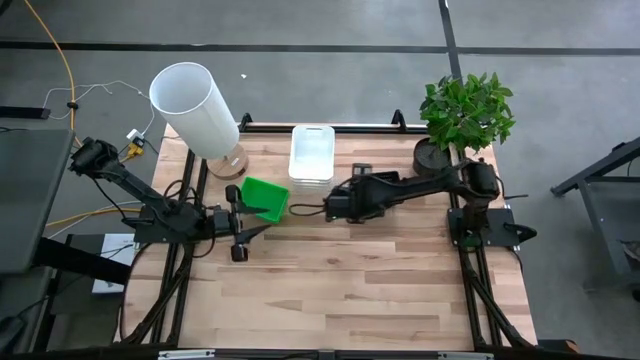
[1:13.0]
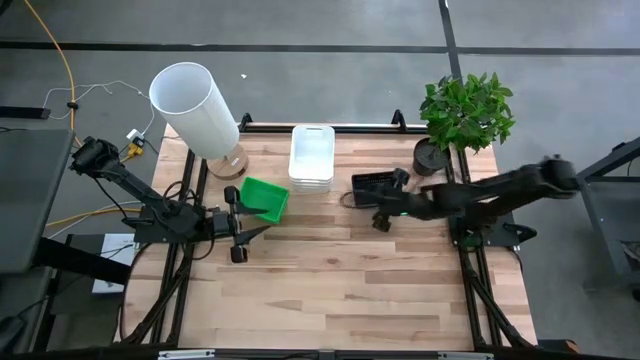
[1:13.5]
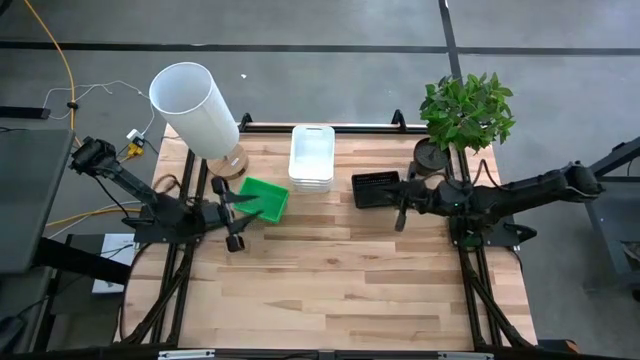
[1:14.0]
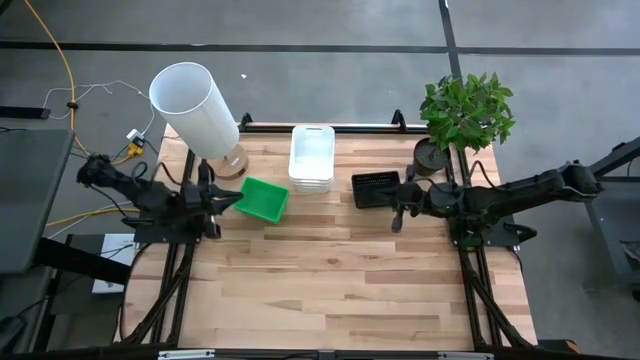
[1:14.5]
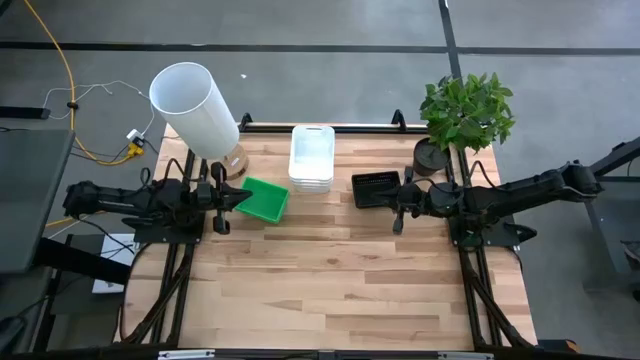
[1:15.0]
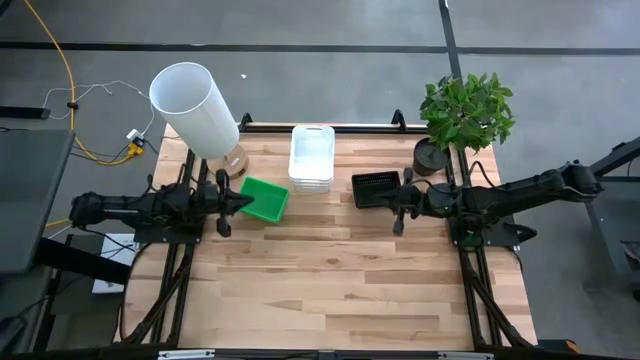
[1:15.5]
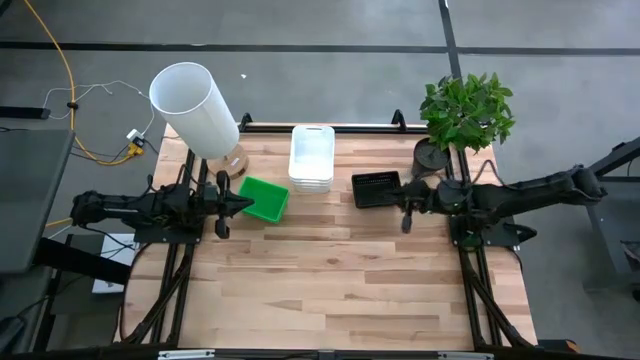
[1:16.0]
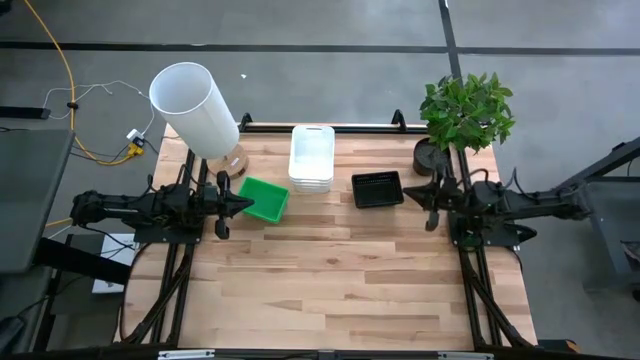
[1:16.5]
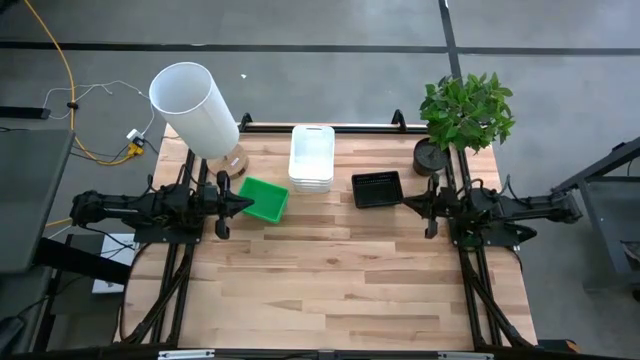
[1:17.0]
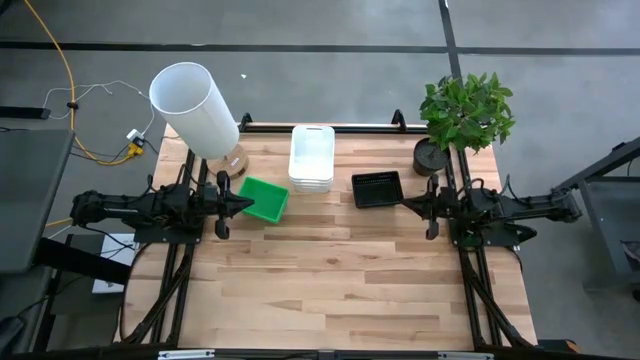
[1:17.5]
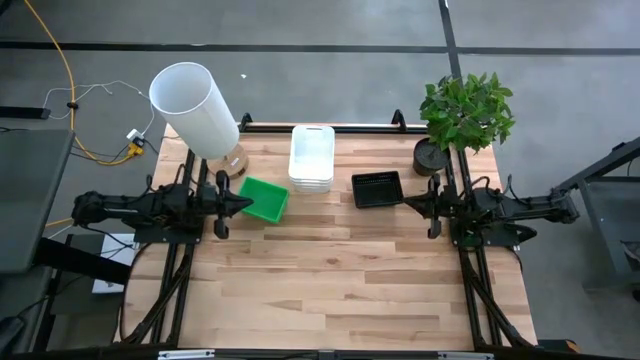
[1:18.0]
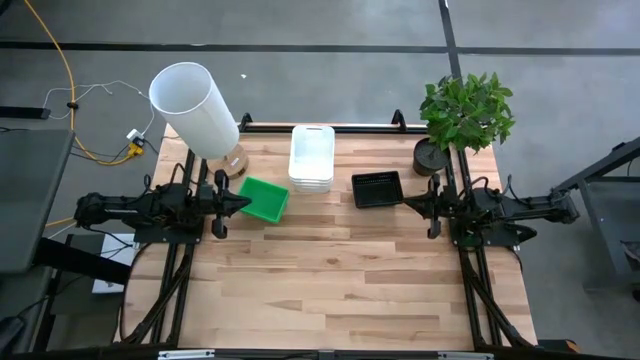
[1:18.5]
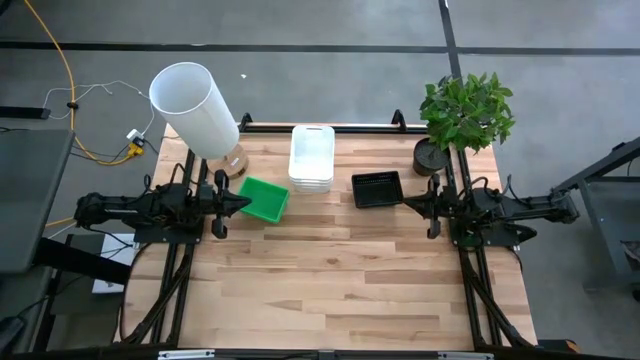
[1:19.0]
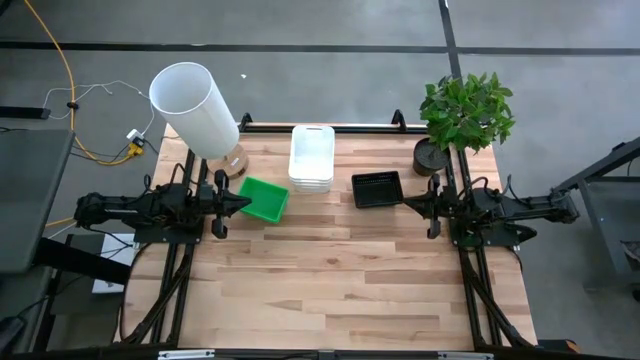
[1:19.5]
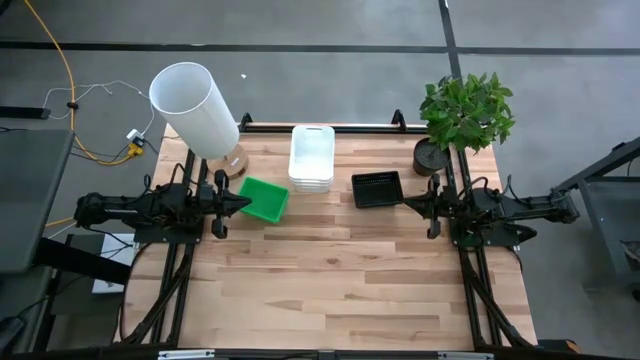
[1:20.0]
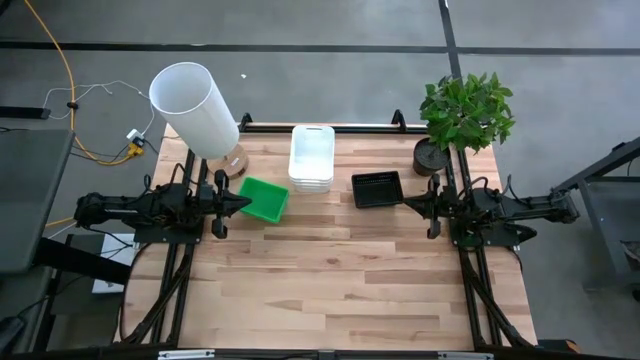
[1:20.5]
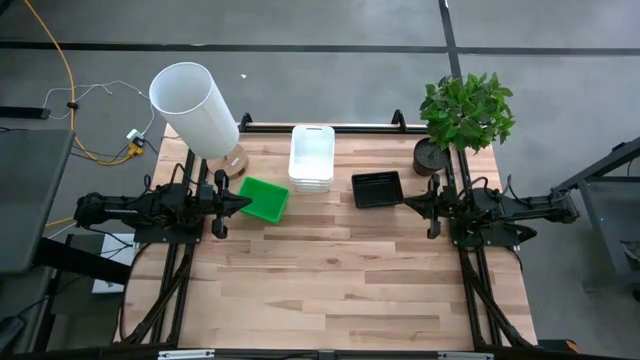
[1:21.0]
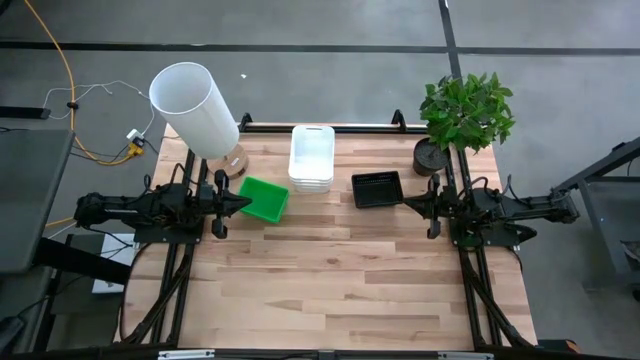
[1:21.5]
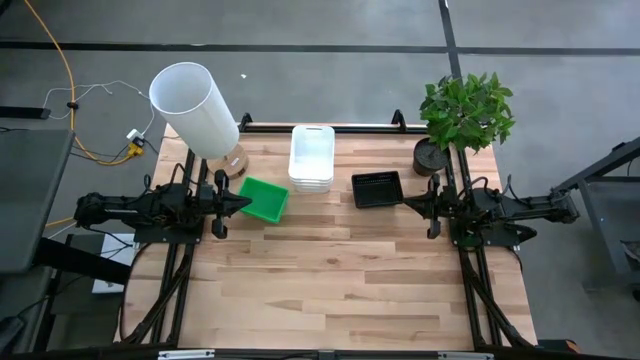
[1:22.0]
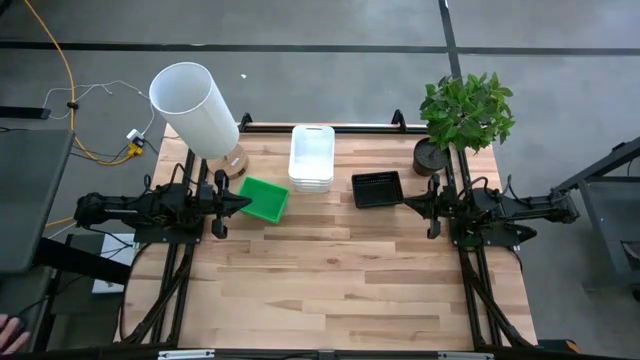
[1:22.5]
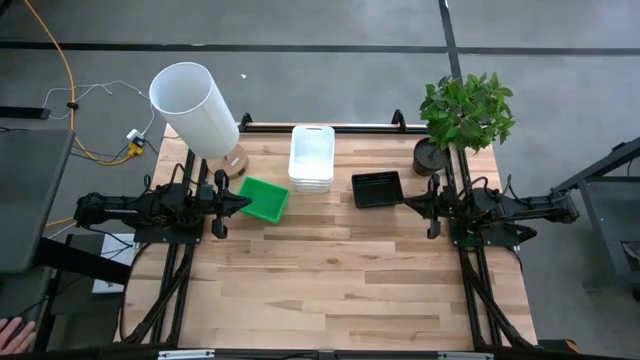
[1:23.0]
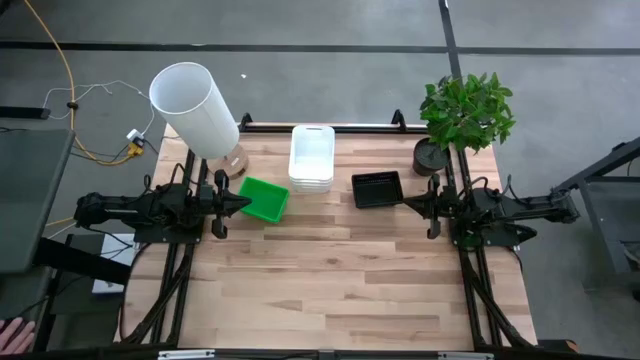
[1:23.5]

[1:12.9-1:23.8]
Return to Home Position
